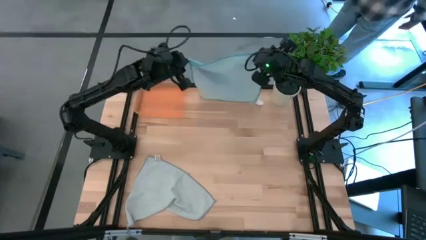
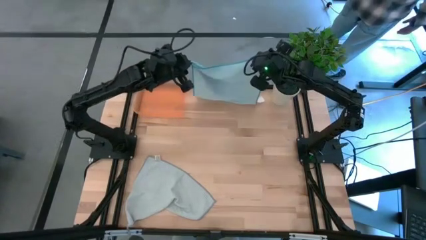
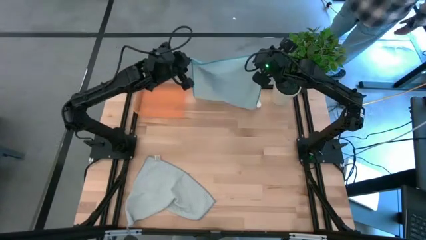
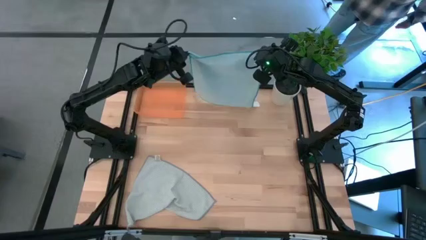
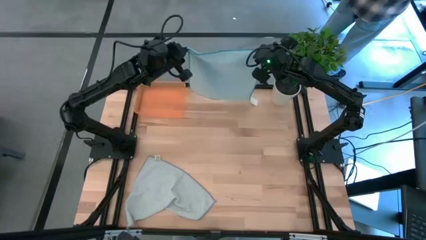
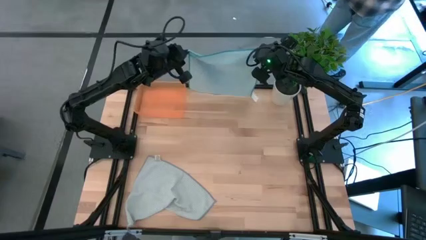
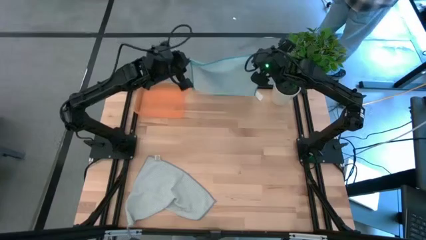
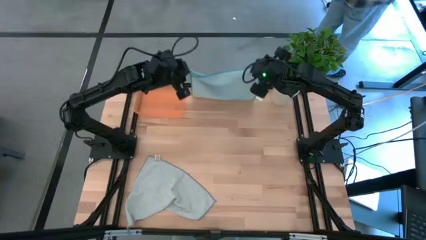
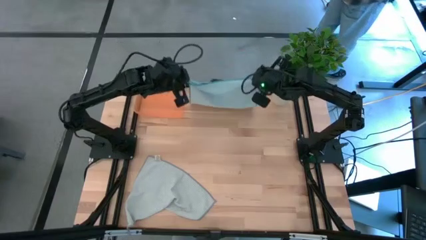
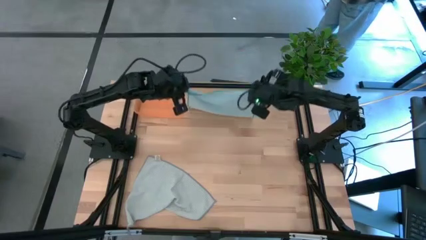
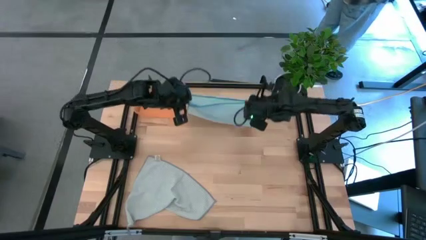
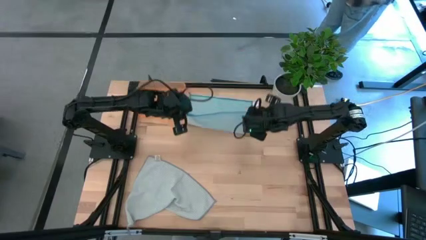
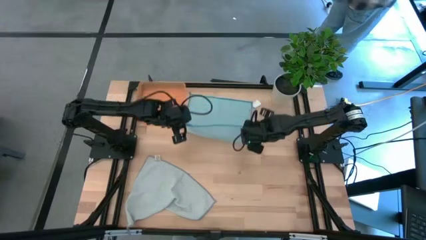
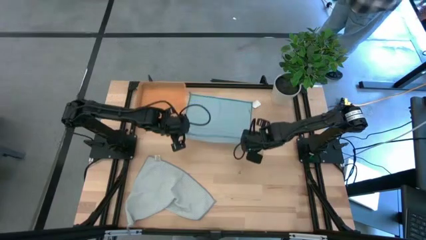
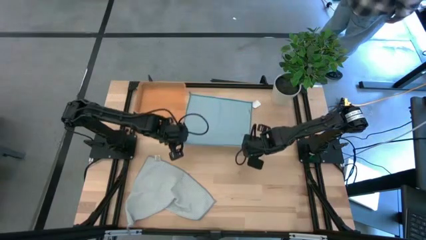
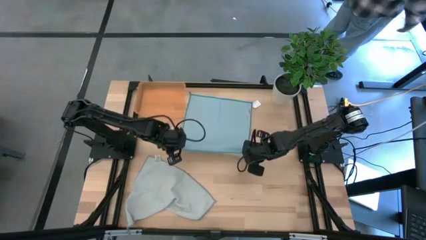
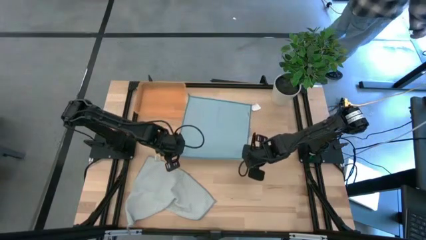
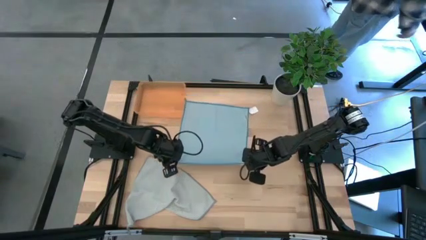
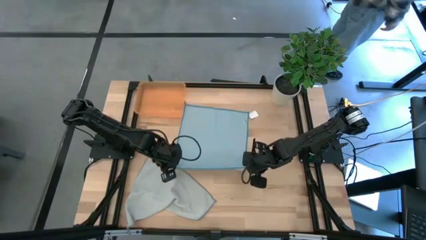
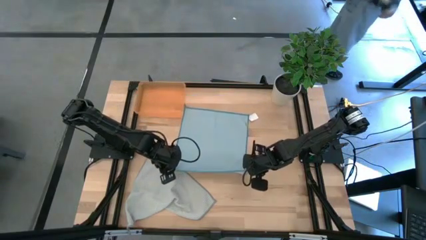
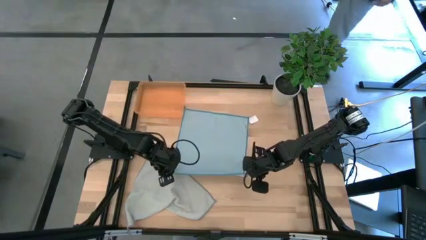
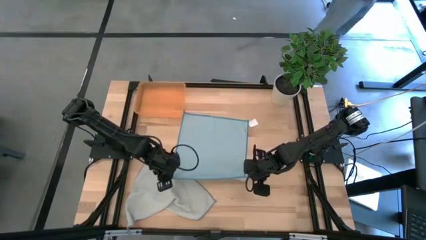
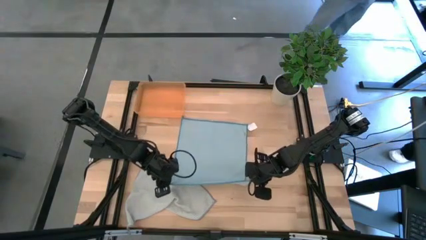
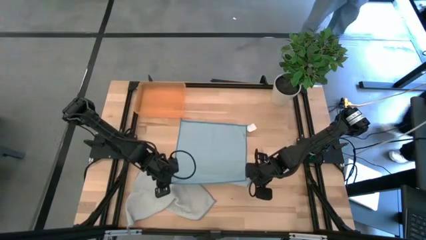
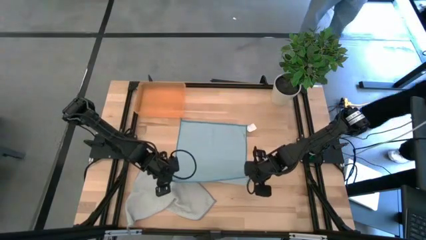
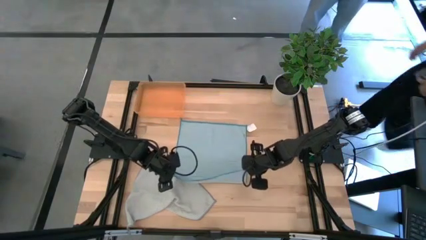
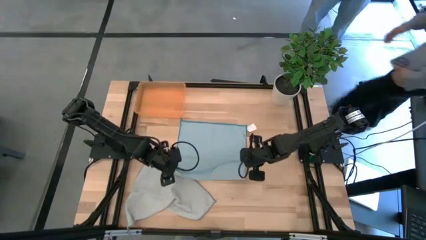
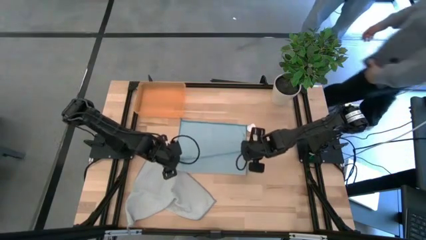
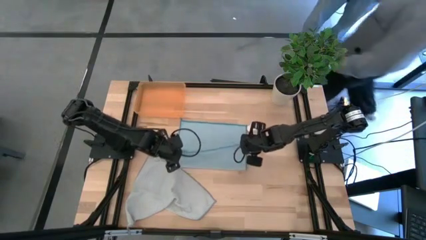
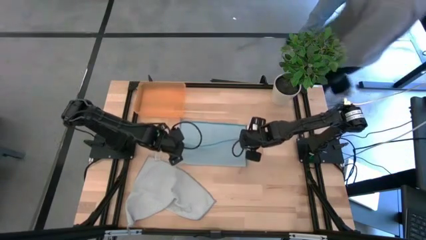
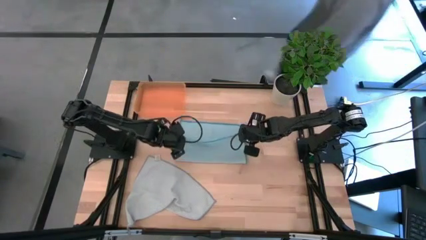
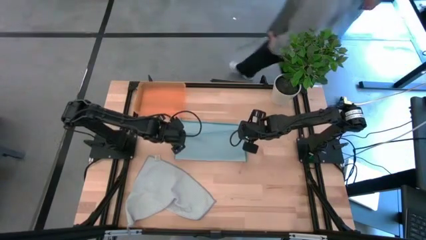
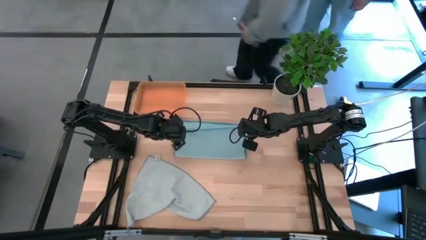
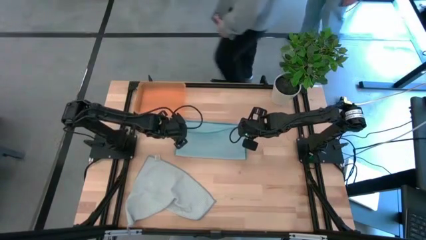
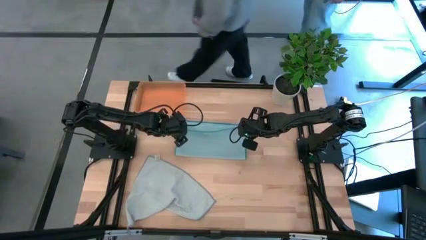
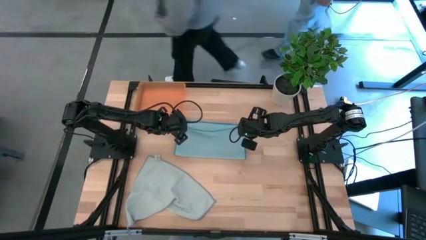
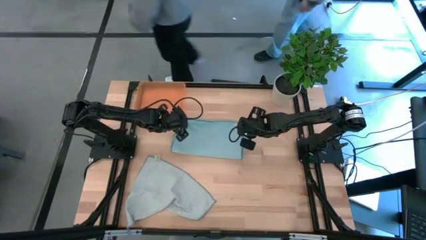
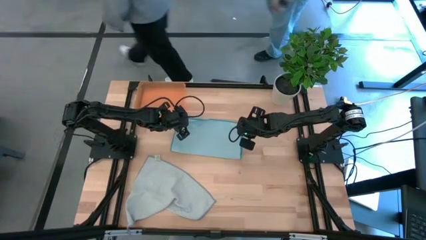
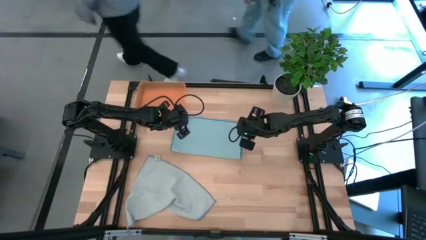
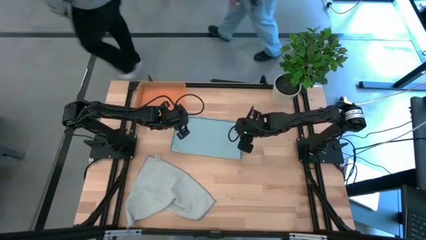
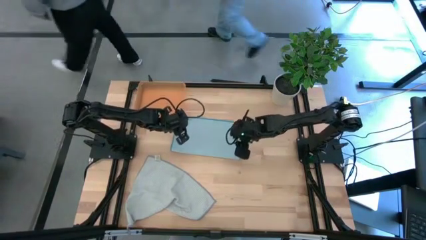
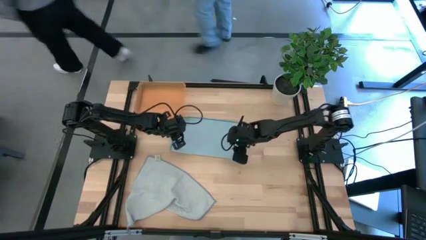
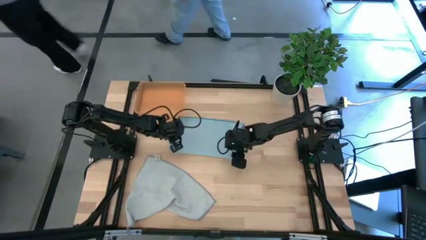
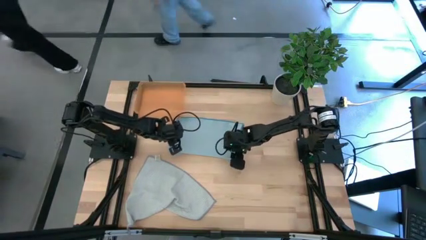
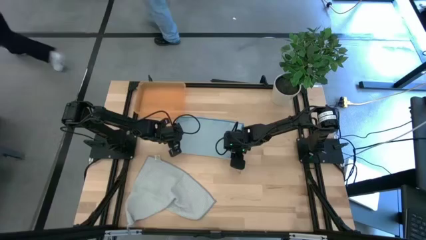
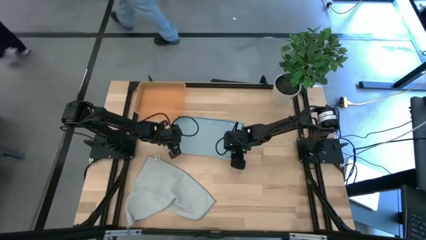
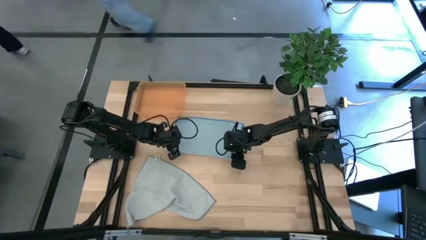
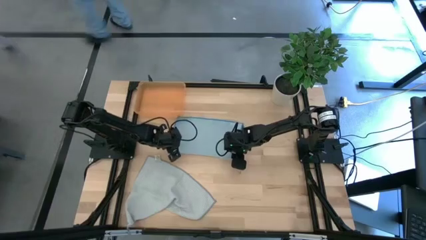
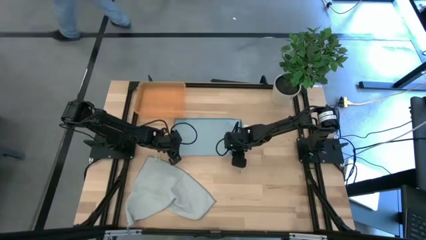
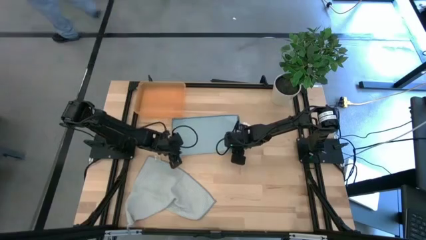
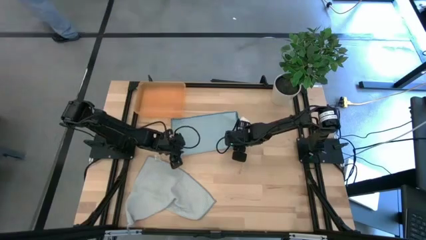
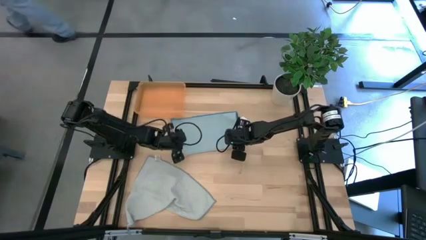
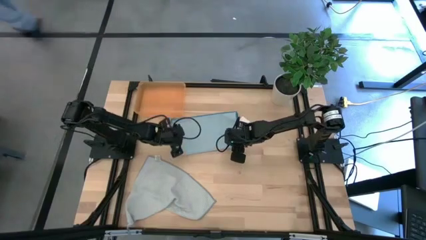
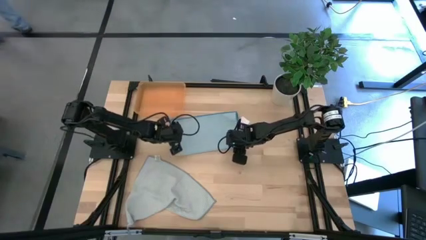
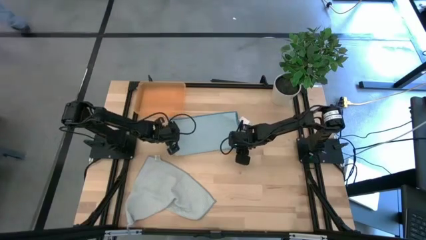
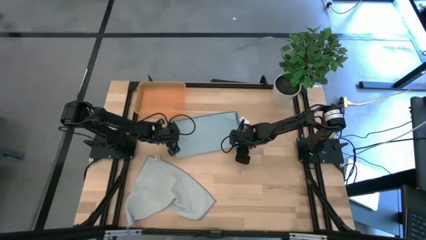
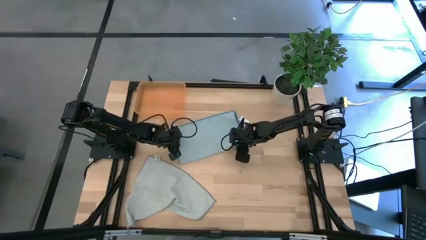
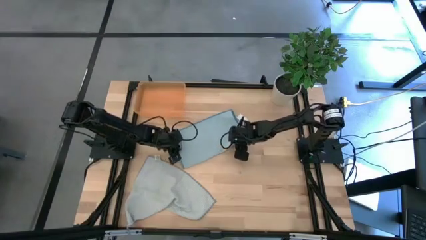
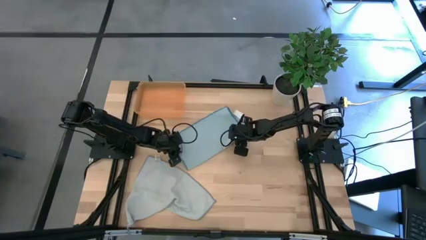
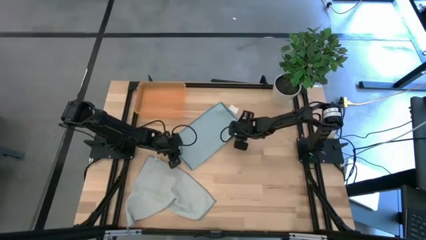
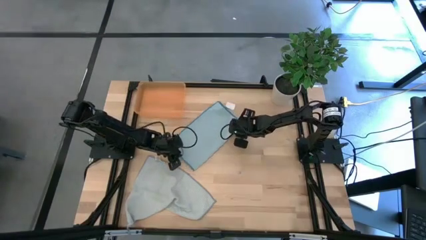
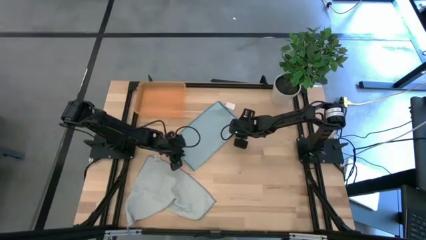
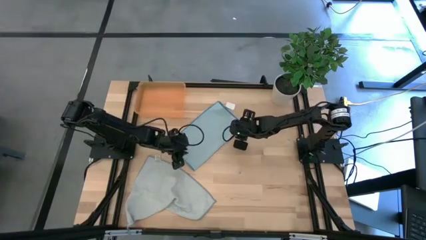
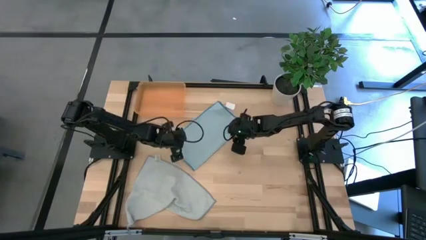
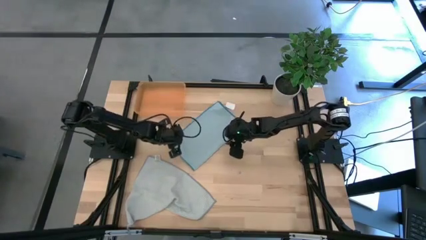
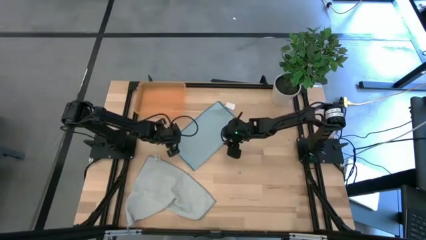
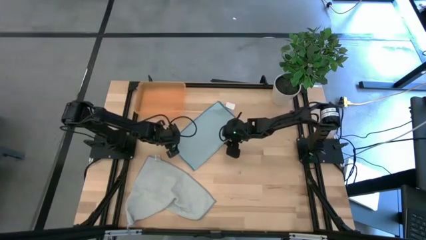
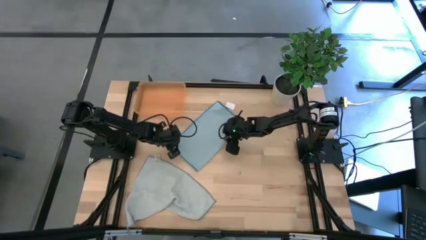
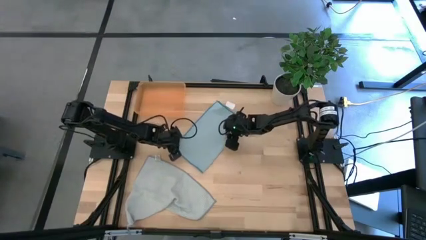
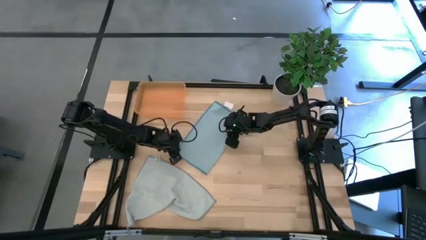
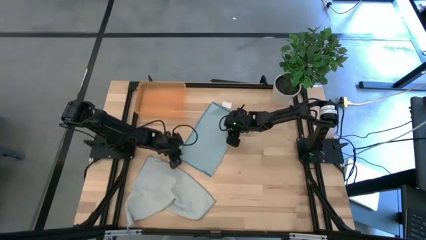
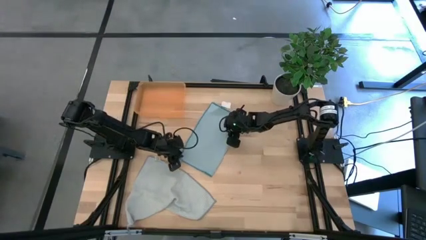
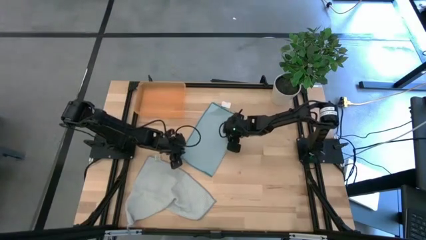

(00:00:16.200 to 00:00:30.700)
Task: Roll microfiber towels into tight, uniform cylinder then place into a basket
Fold the blue microfiber cloth
